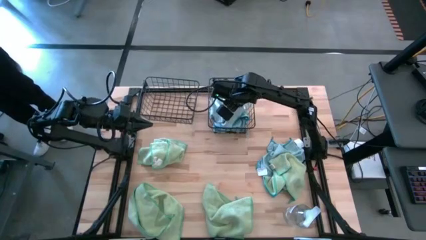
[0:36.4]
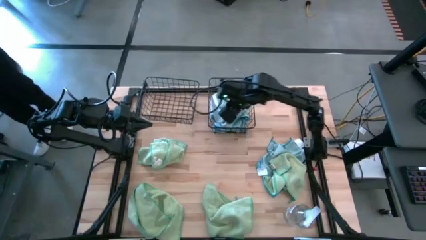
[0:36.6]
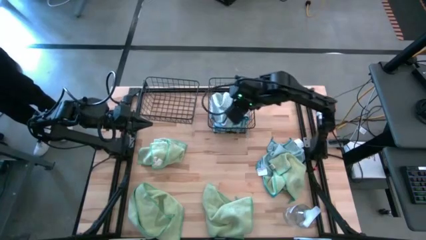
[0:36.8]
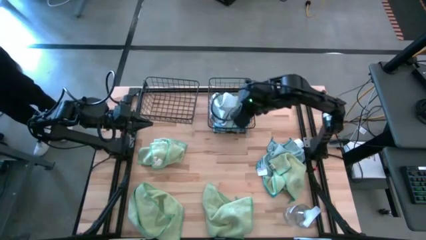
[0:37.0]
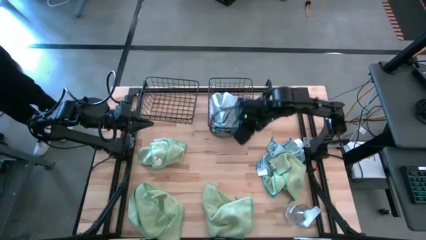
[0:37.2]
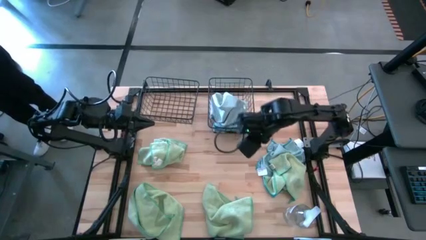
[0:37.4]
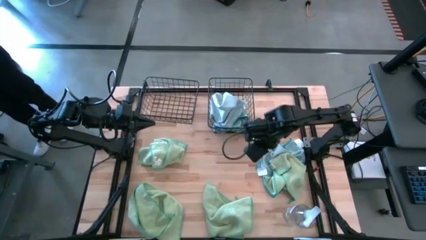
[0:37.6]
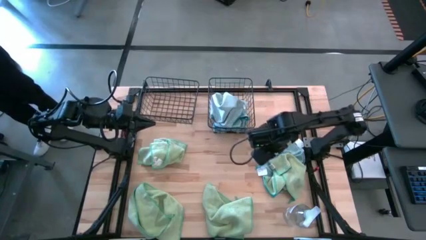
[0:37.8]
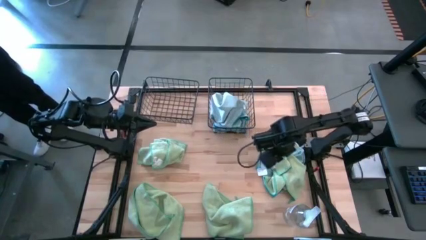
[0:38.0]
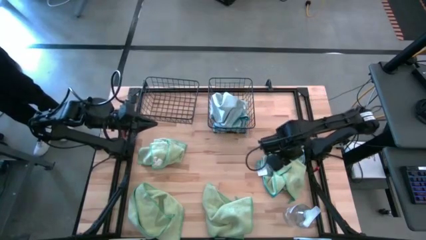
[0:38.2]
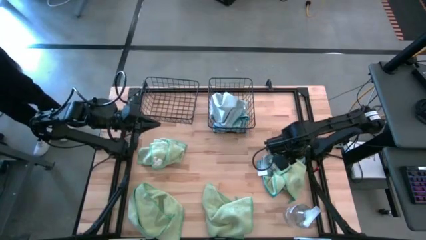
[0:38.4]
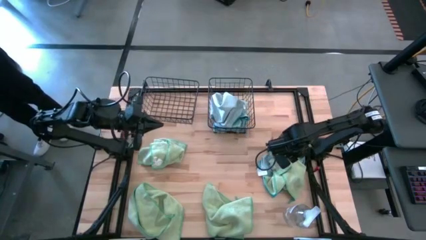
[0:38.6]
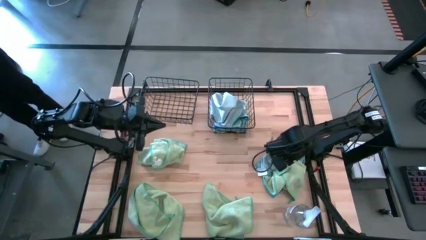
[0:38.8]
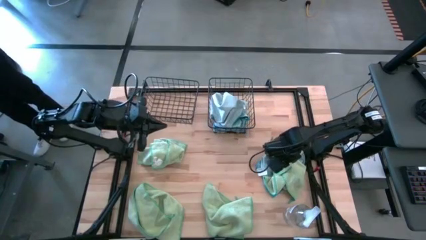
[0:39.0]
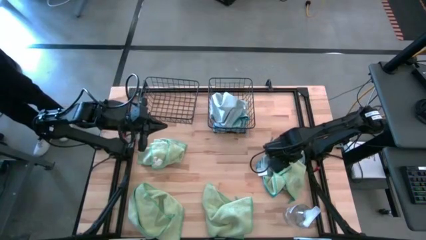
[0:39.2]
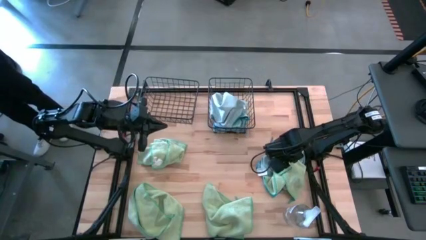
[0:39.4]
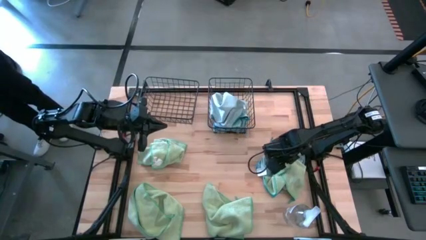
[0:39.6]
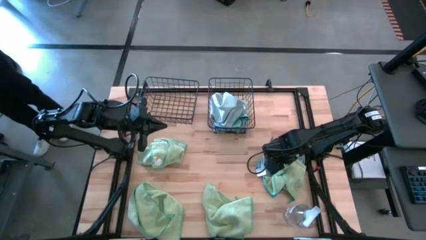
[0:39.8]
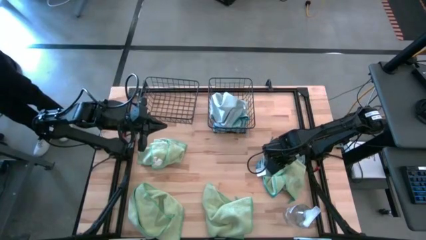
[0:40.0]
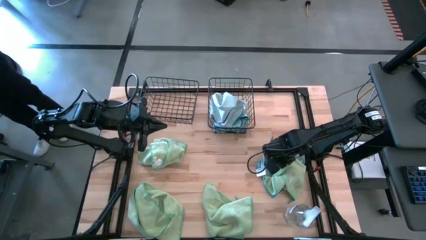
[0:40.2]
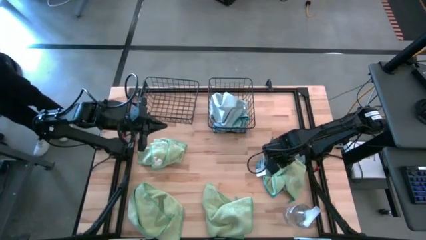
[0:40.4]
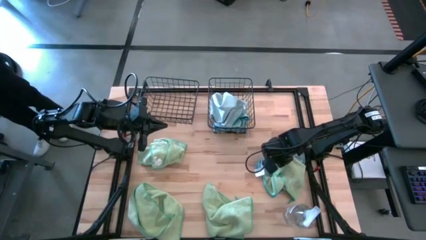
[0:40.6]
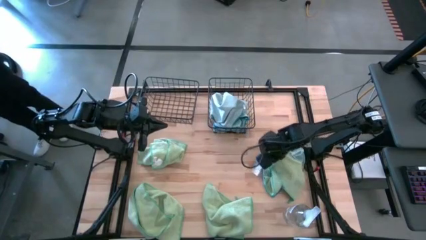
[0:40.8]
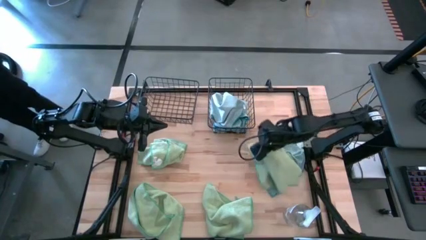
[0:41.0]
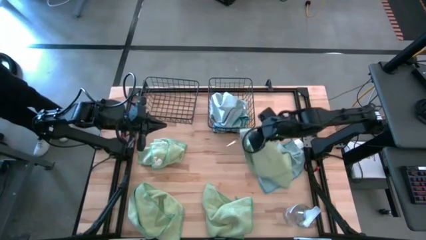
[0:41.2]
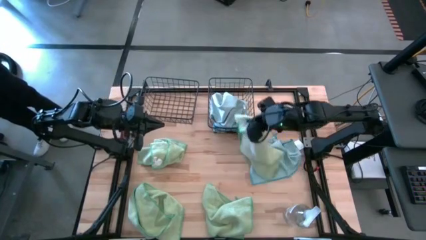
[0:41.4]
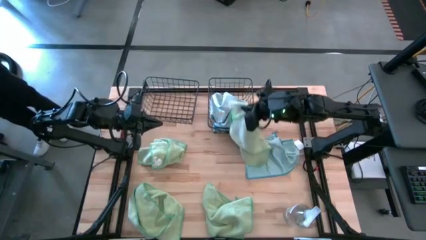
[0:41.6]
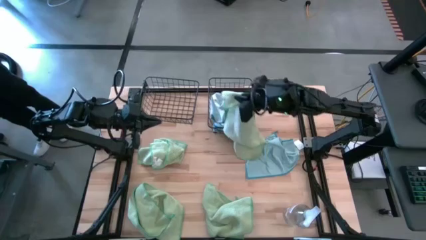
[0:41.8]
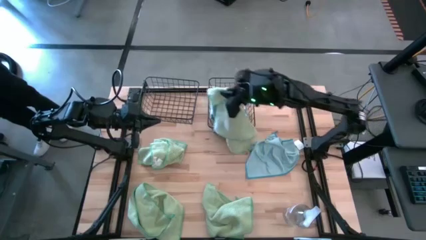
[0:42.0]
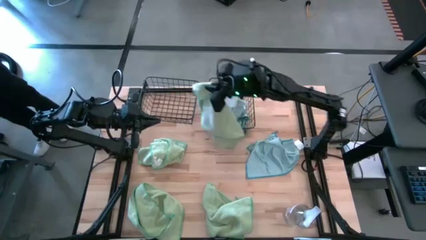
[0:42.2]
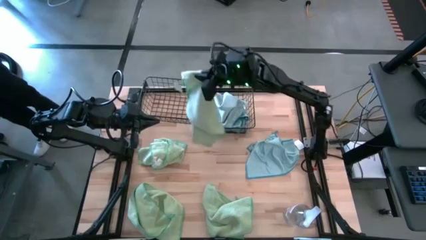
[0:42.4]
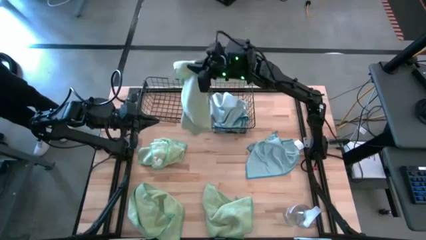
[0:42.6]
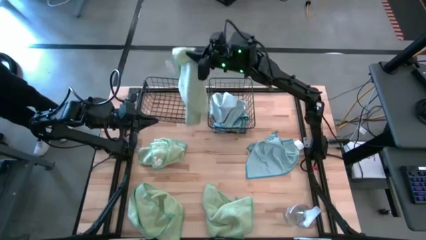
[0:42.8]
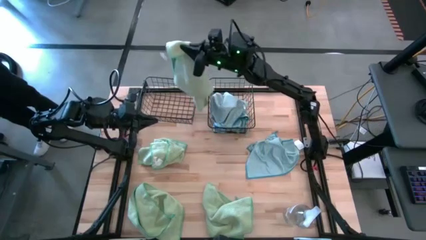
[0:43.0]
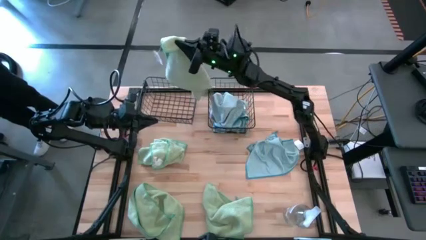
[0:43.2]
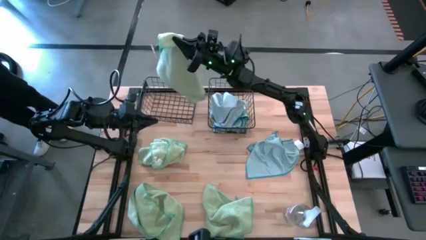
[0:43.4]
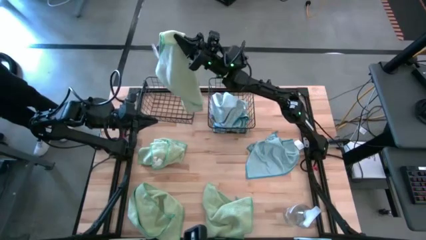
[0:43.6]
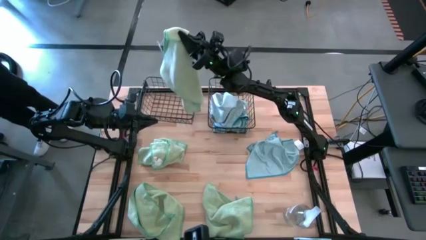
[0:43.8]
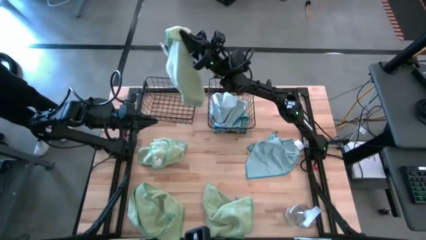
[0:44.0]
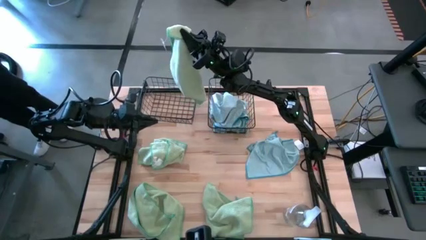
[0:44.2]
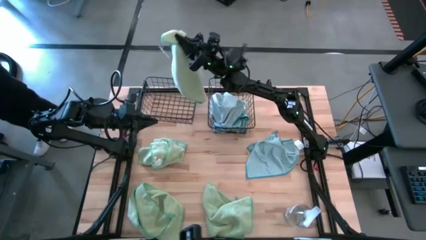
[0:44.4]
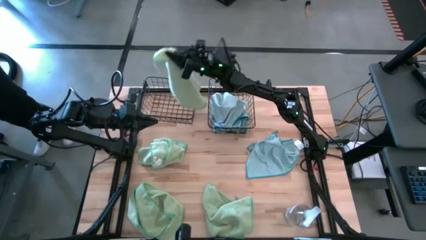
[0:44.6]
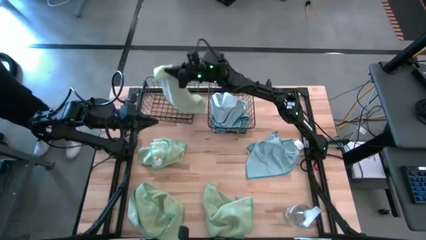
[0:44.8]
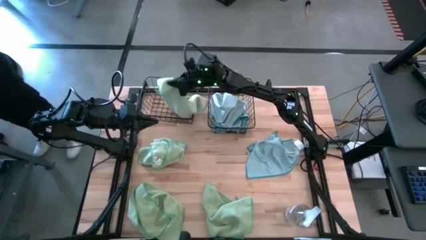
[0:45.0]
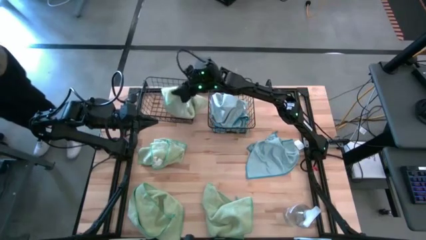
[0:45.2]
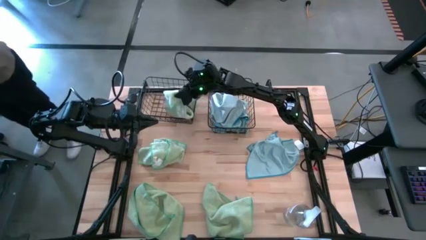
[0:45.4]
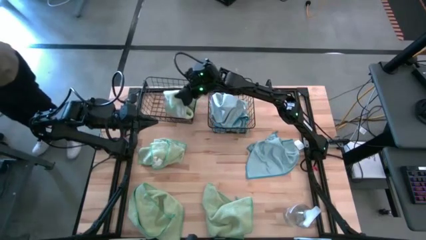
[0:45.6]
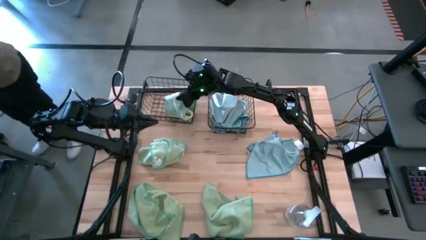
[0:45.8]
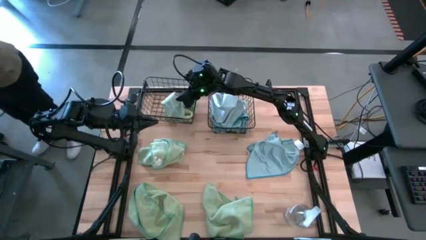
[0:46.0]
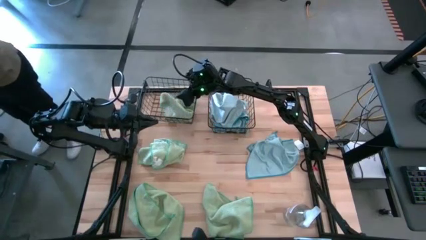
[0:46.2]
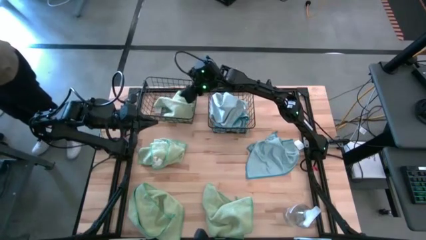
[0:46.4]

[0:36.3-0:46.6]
Task: Sort microfiber towel by color & place in baskets
Put the green towel into the left wire basket

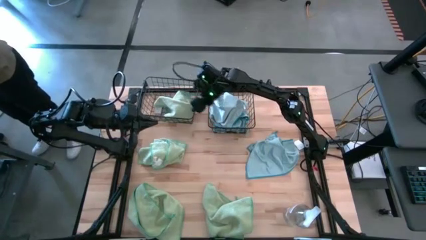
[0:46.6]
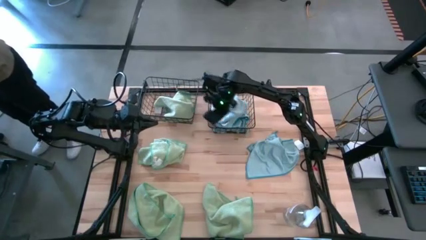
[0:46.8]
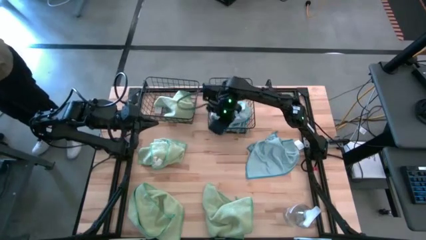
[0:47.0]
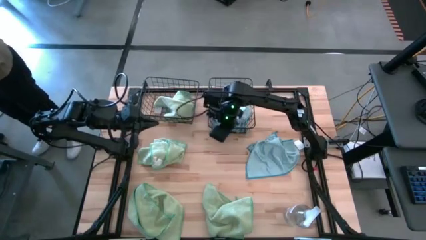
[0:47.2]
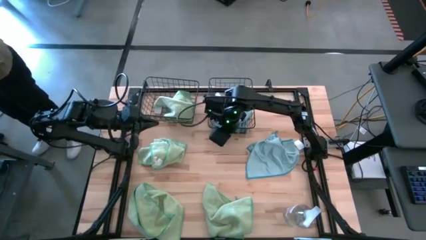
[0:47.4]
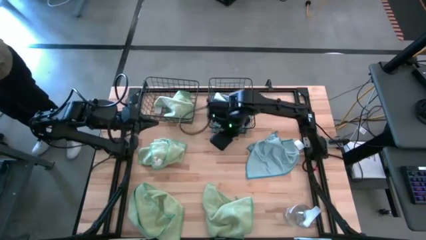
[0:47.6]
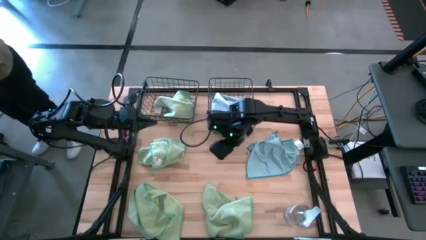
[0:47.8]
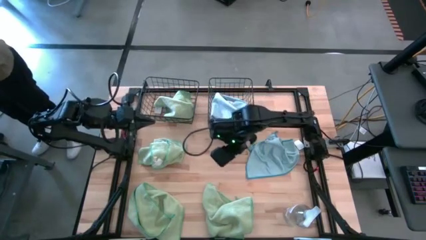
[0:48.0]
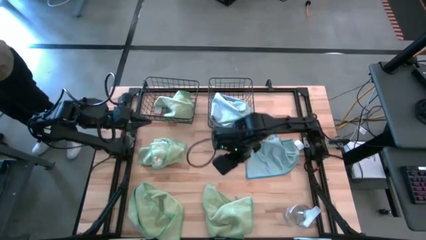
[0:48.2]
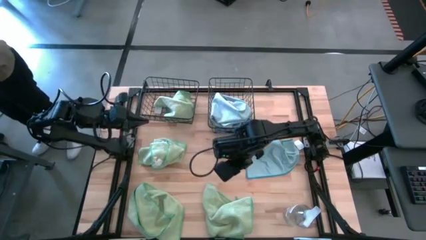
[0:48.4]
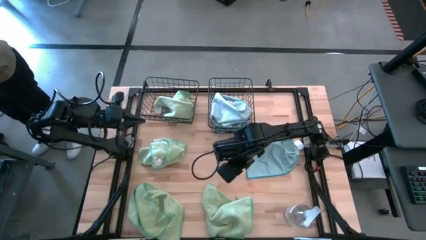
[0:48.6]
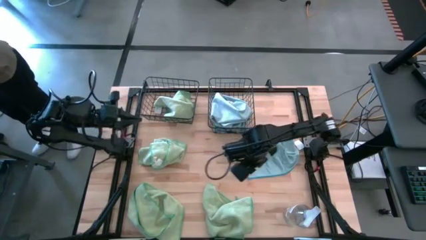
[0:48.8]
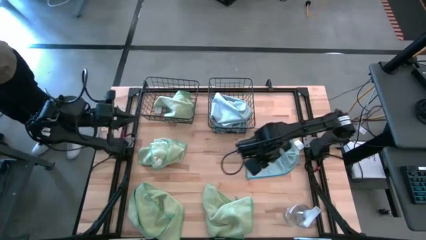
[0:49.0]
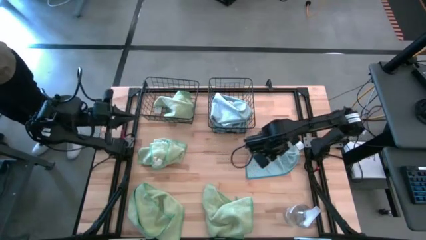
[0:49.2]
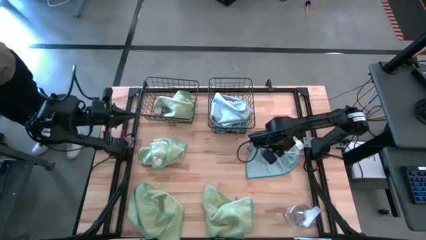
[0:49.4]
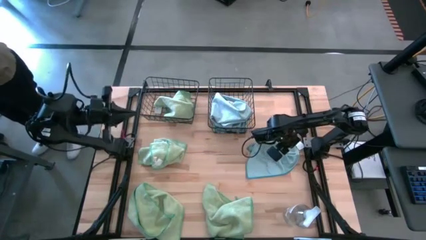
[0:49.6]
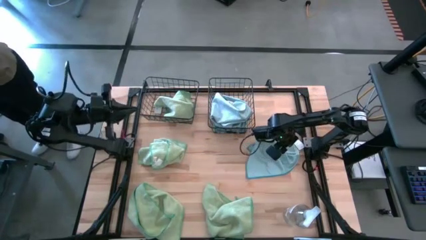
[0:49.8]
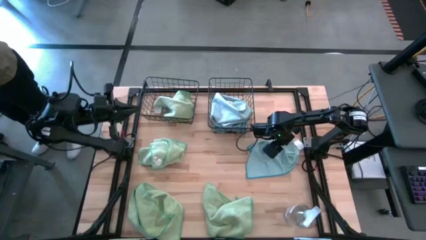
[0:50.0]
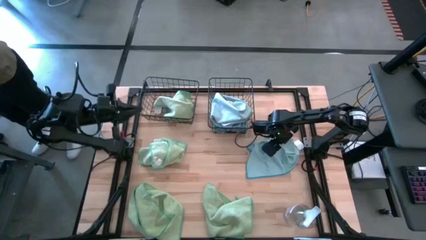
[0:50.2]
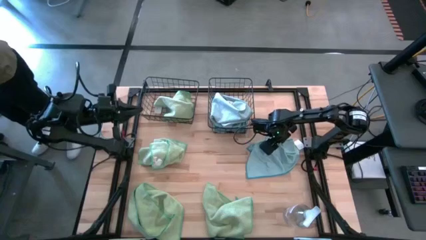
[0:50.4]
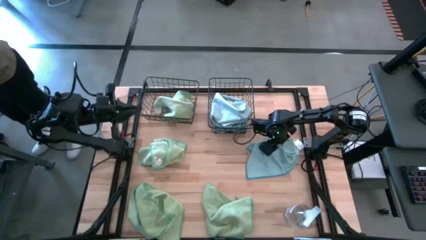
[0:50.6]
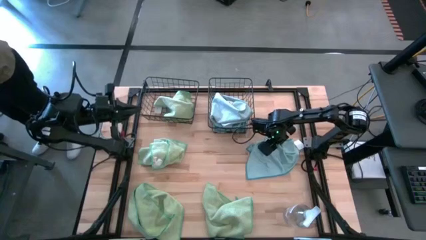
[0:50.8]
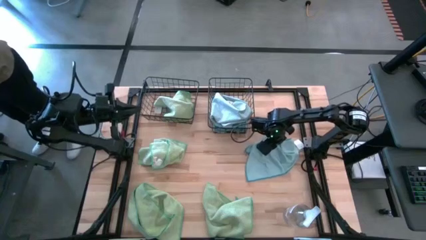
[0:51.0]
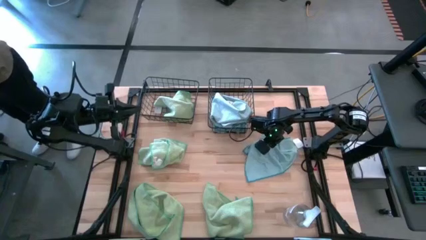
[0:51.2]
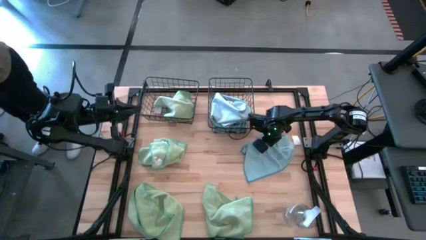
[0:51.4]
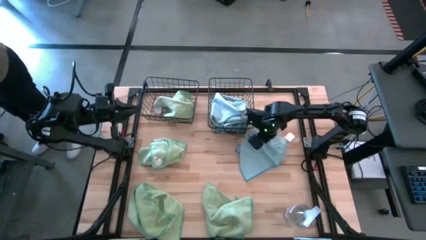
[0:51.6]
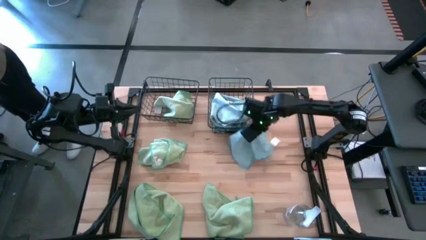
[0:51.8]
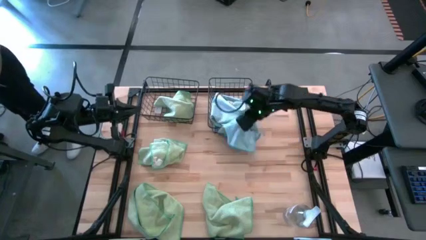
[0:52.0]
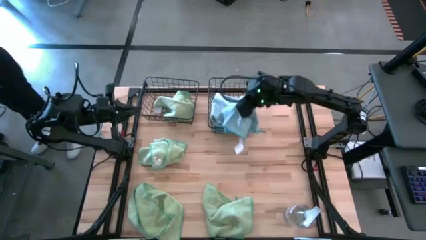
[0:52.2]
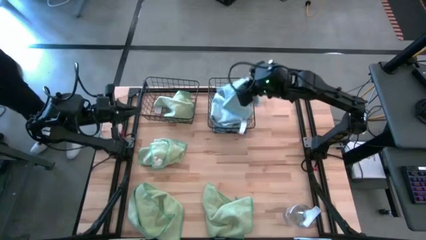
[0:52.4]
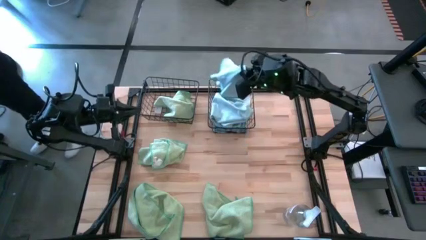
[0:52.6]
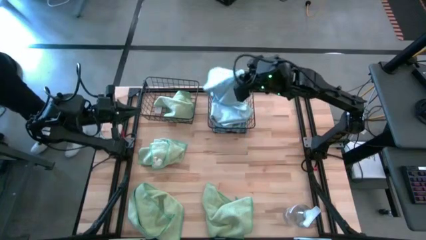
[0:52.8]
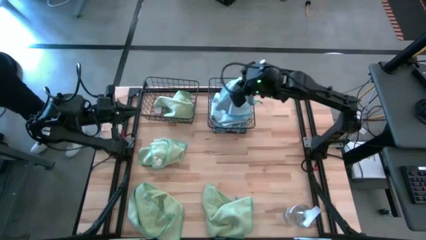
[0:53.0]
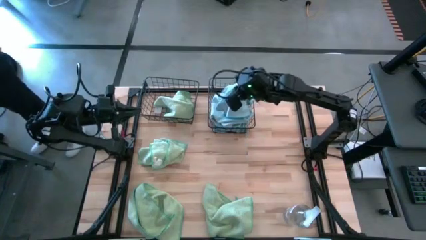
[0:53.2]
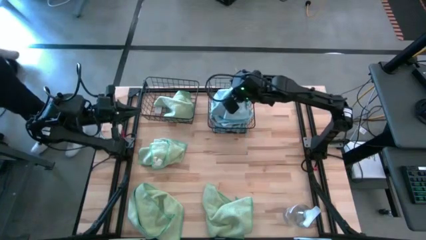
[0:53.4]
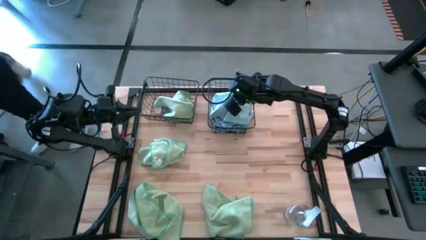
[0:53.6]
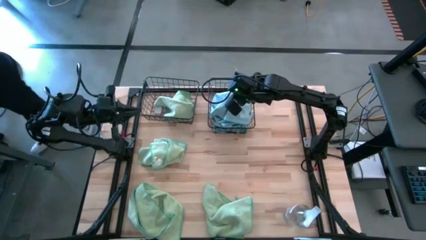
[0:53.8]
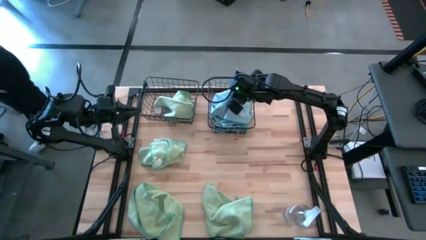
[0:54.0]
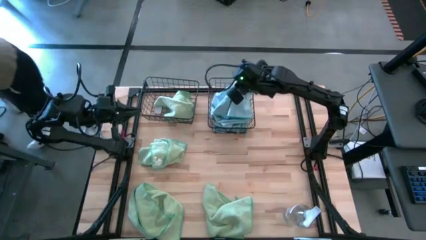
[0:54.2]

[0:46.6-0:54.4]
Put the blue towel into the right wire basket
